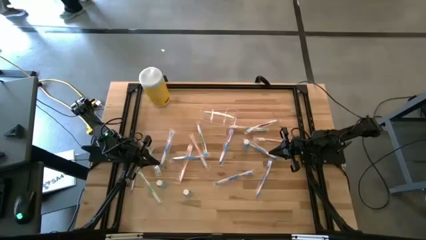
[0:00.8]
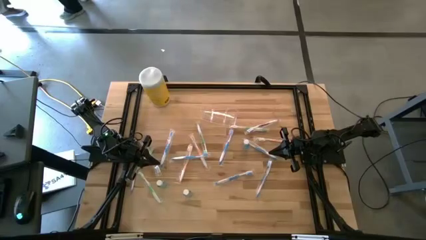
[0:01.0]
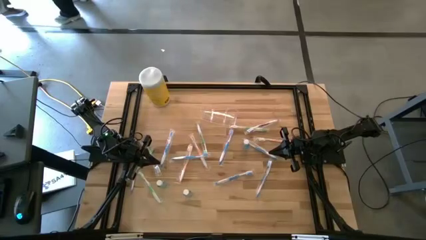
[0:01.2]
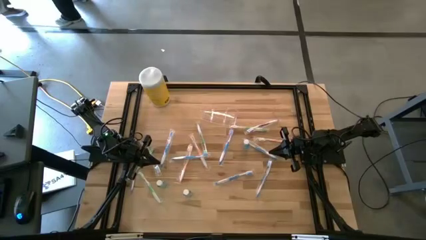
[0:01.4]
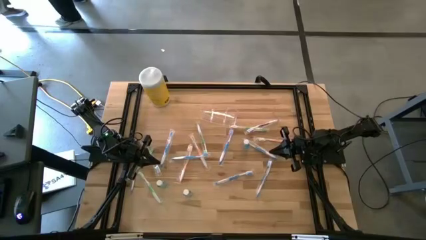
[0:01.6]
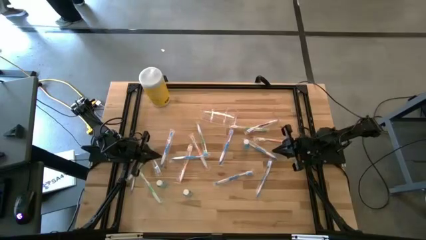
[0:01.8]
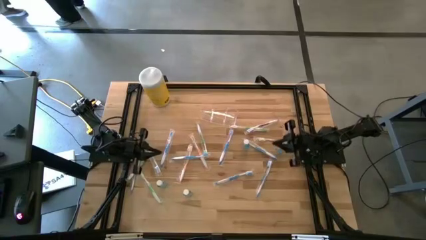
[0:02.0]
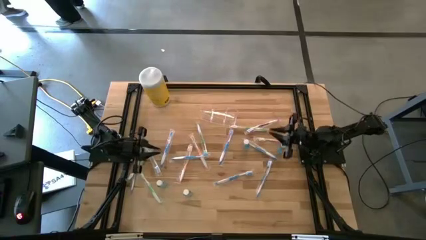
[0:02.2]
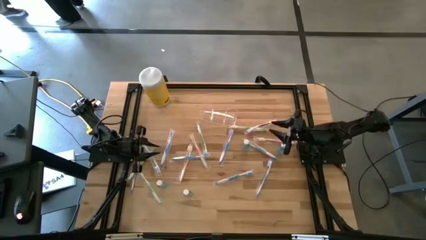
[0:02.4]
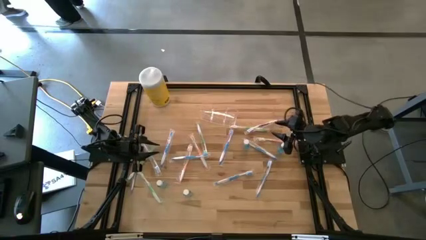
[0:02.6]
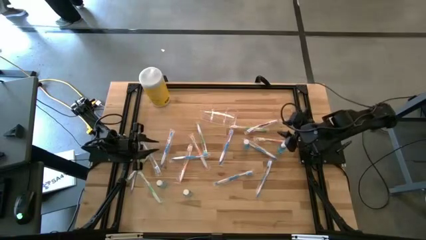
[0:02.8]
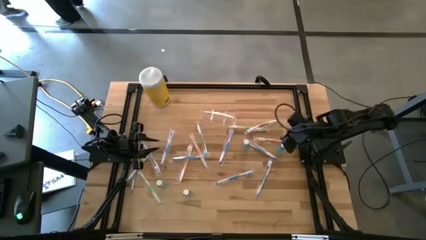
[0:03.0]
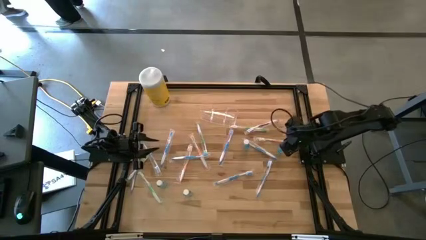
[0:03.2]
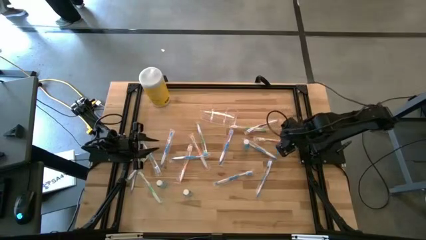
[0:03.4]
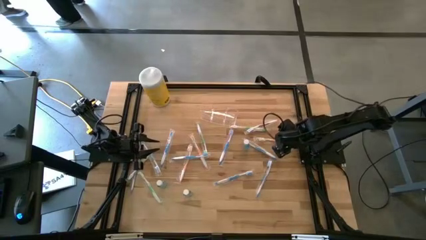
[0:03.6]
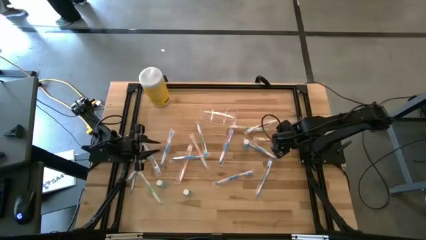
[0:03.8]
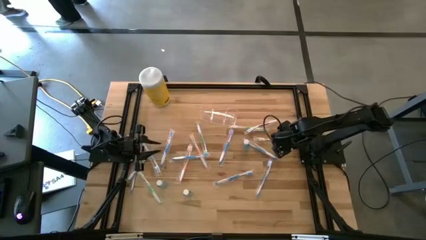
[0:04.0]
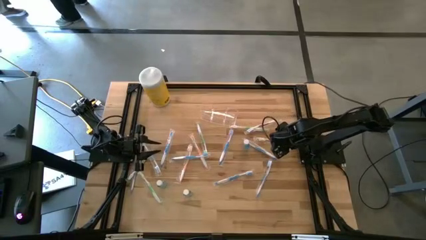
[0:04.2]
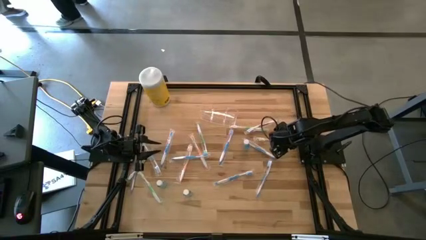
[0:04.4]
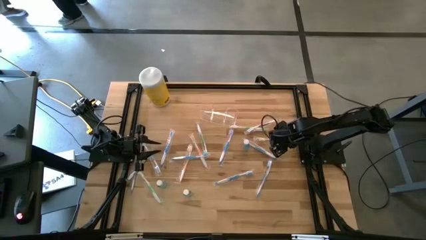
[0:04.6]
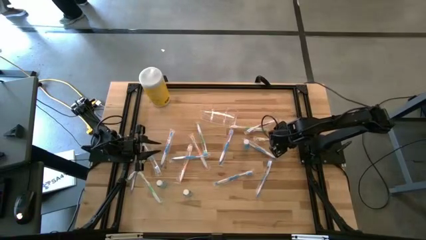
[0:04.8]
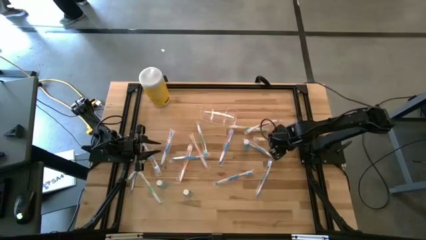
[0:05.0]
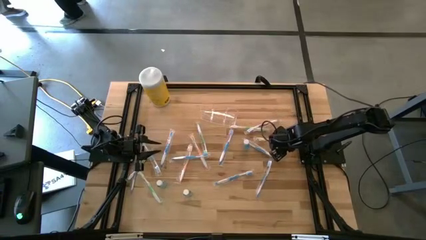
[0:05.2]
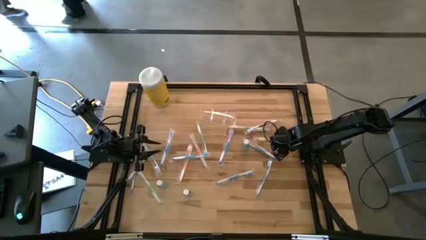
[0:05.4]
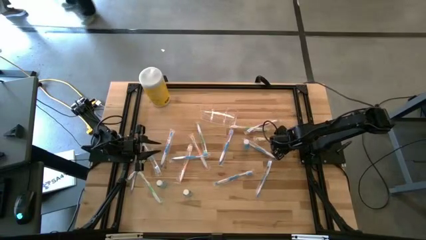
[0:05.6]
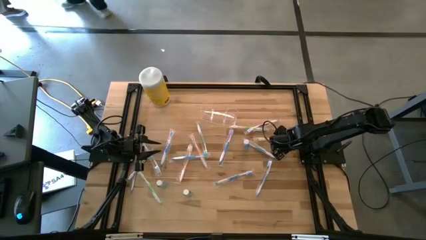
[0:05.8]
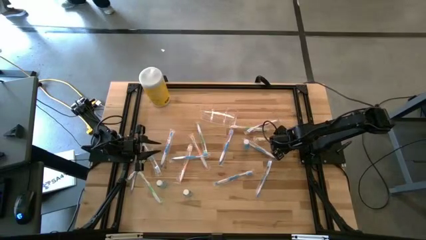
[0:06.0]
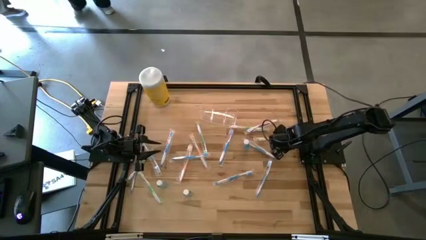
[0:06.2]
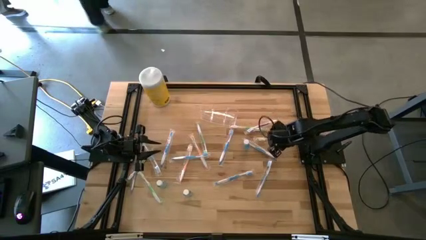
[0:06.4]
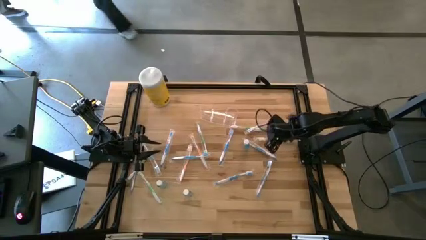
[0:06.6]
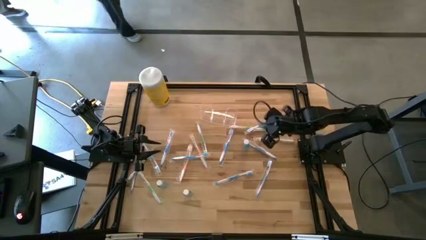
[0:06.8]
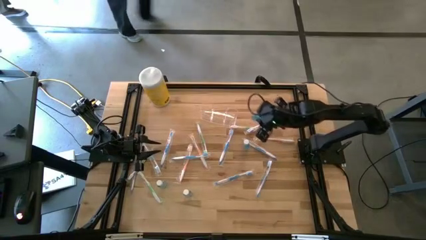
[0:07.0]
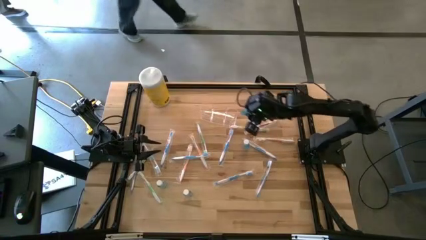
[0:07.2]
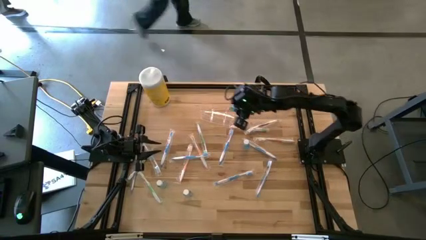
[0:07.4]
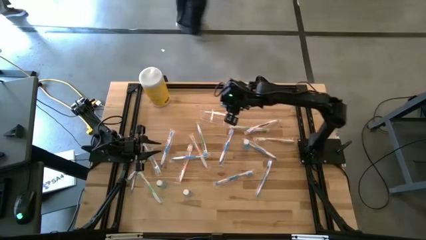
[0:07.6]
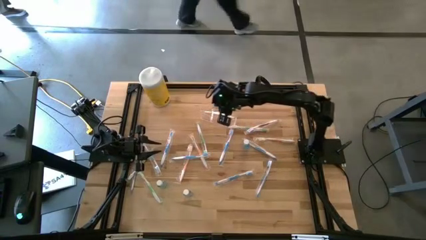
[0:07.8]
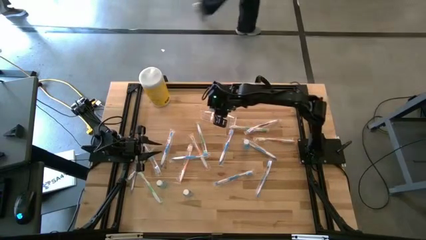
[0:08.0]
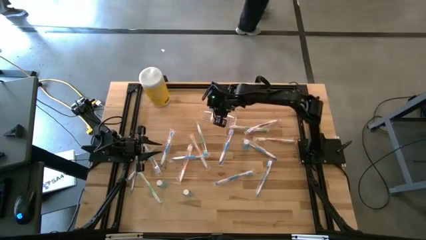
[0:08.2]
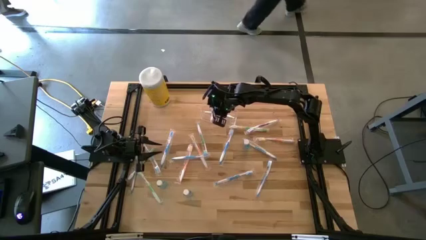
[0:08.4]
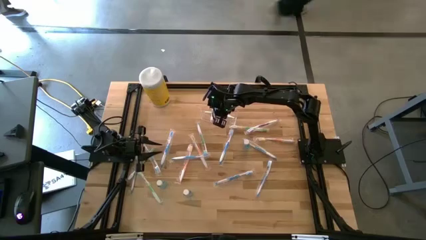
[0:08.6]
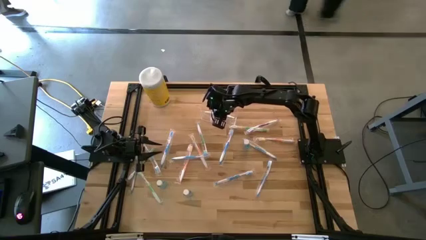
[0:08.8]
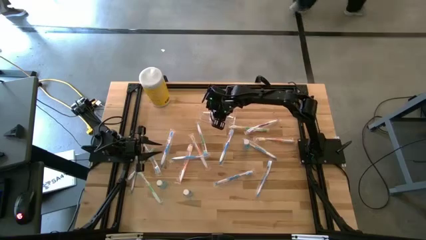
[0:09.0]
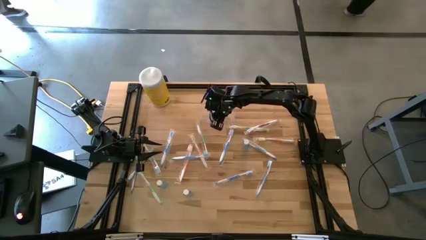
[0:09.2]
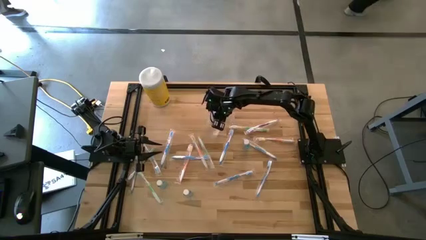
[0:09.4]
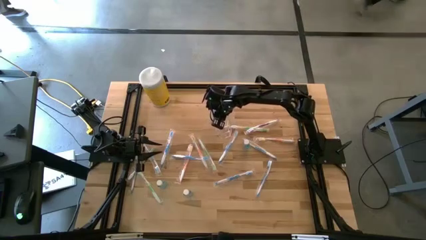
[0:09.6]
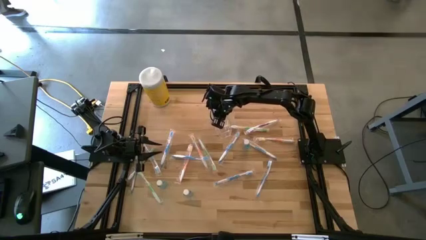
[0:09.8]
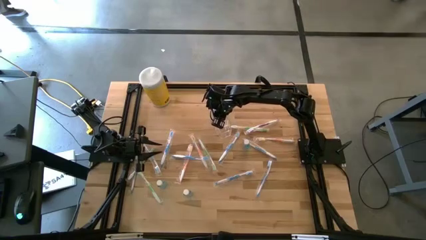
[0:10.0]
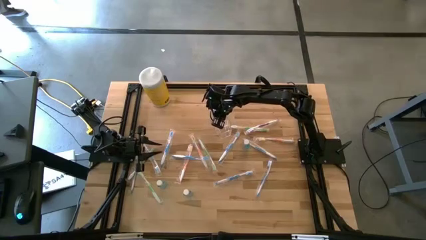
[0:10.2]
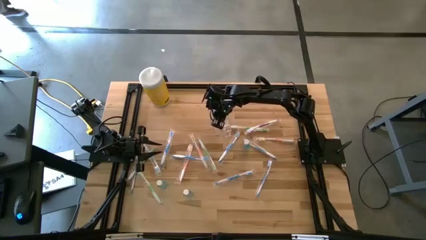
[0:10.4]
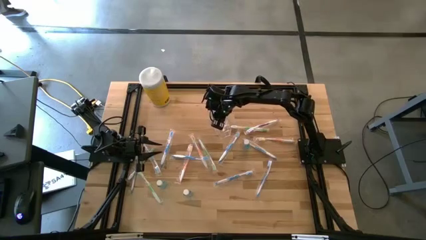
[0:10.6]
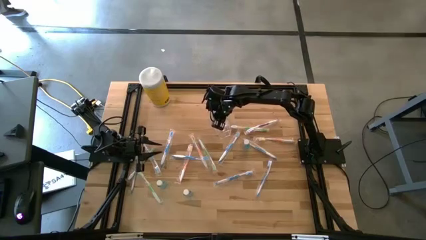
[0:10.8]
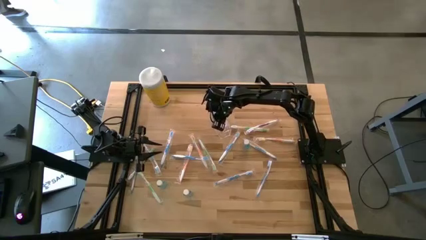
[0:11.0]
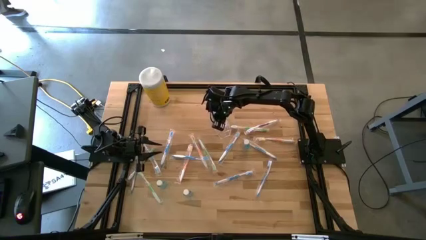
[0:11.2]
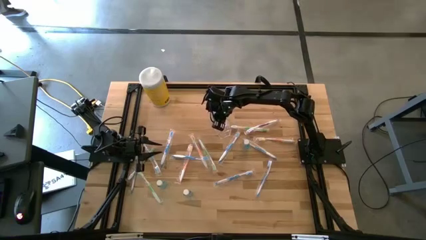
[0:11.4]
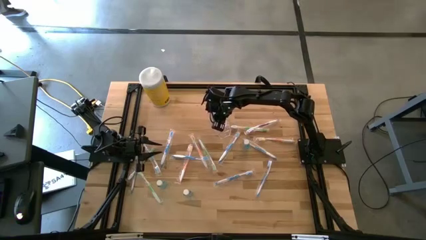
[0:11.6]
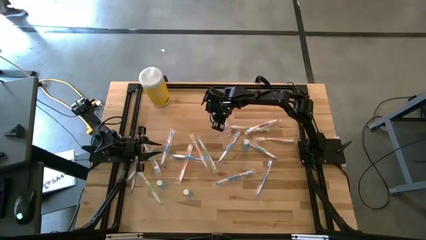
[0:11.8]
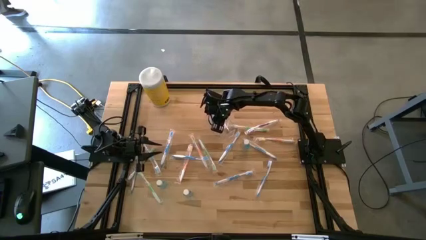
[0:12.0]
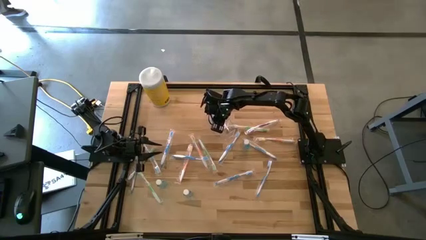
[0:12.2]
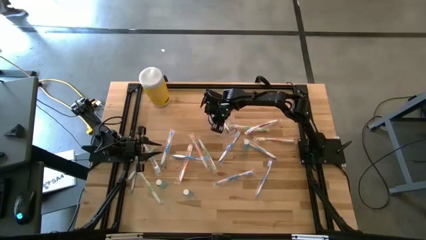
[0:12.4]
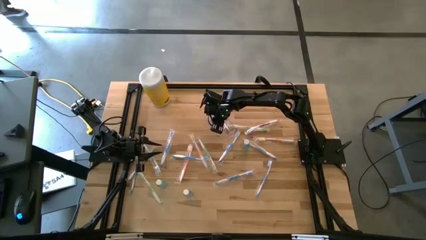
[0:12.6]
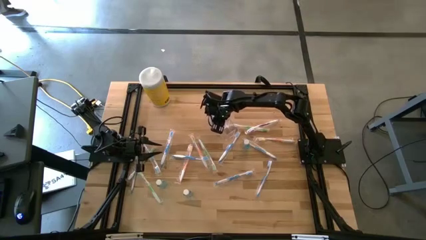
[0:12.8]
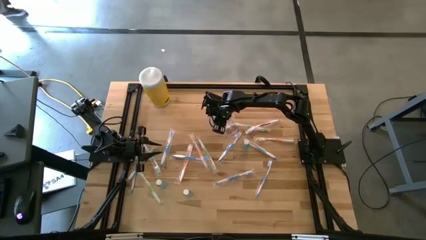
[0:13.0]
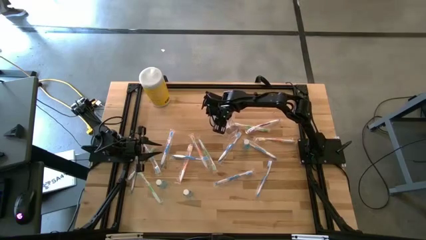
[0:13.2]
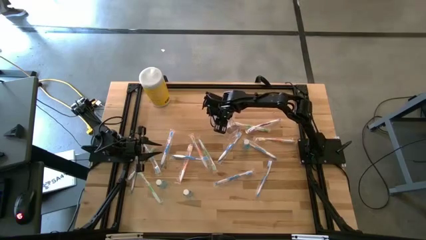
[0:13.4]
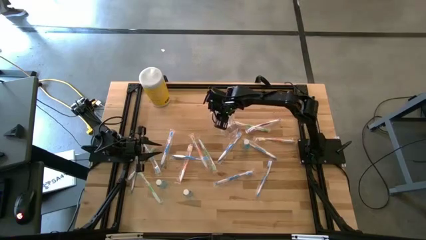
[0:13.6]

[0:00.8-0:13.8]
Task: Pick & Place toothbrushing station
Put the blue mouthwash into the transparent organizer
